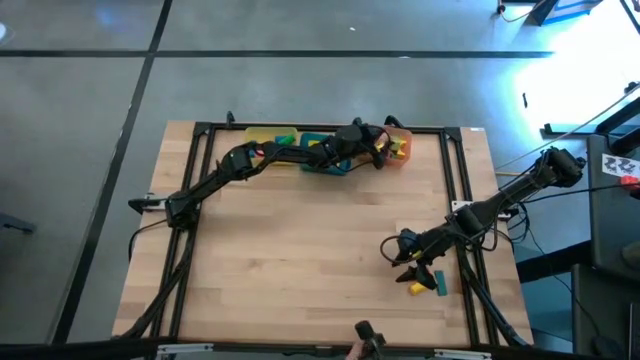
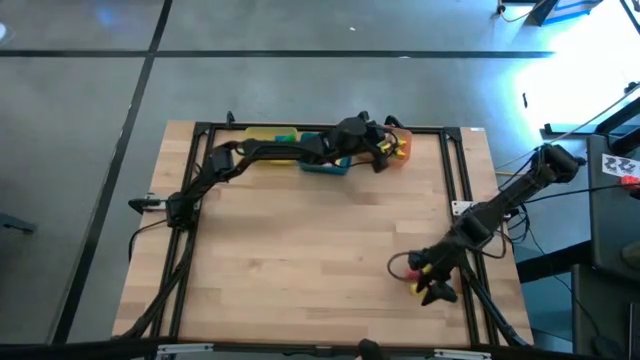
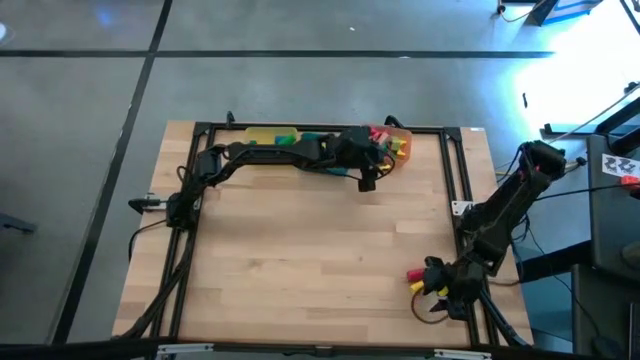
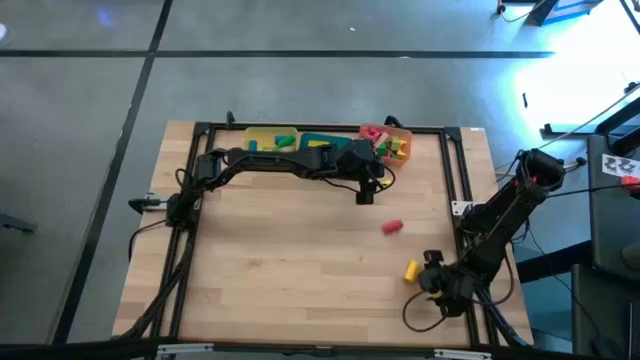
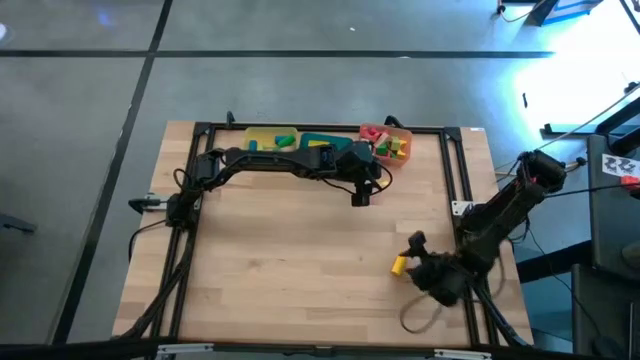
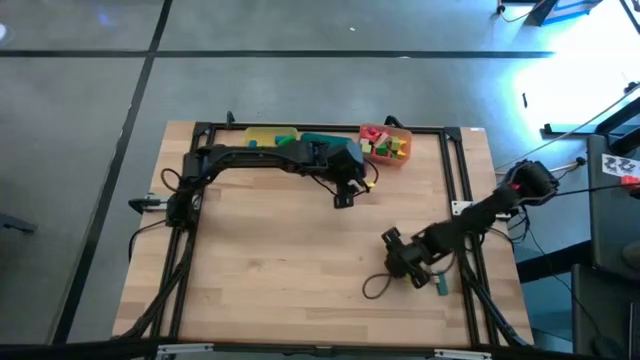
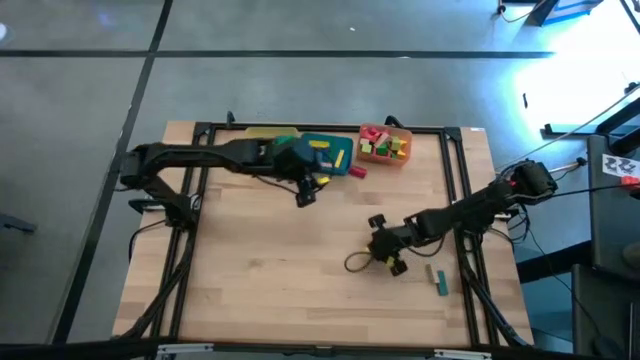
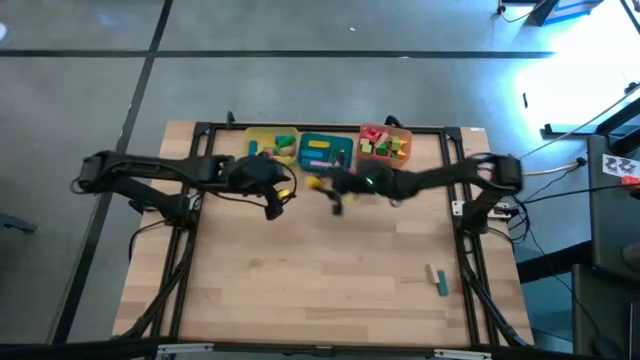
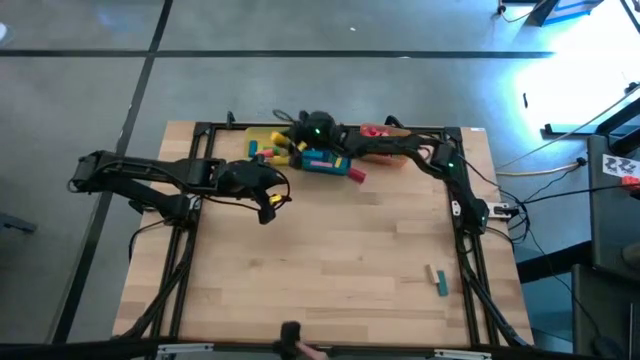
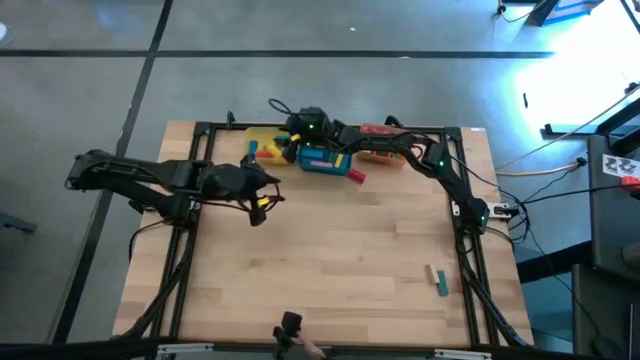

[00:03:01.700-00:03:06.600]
Task: Sort blocks by size
Put the yellow cylindrical block into the yellow bin

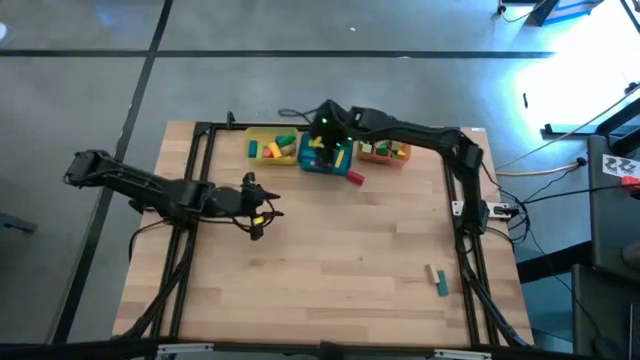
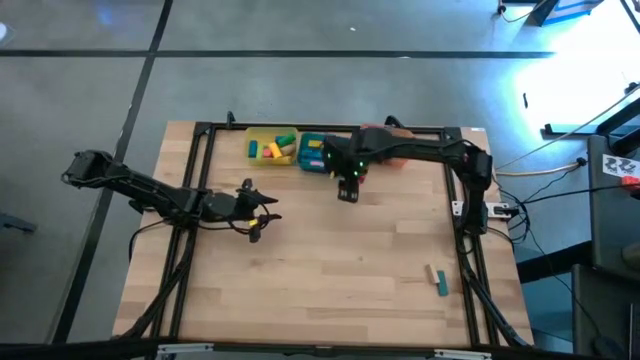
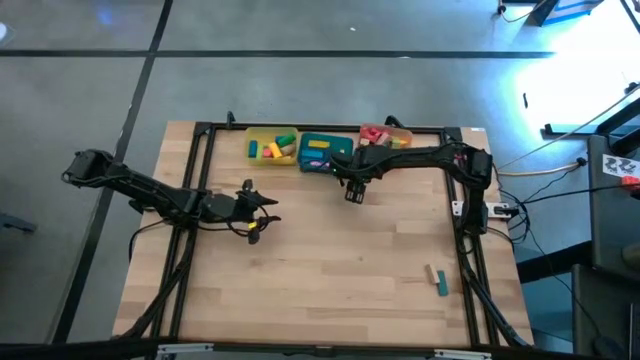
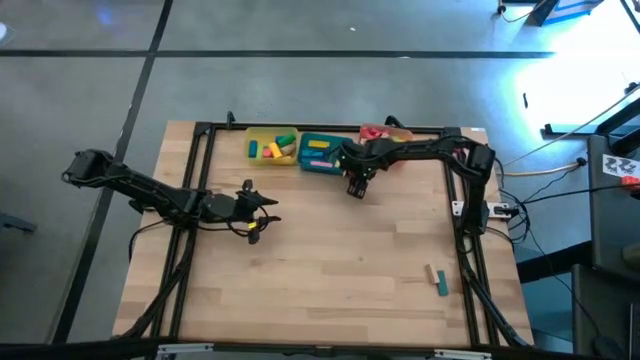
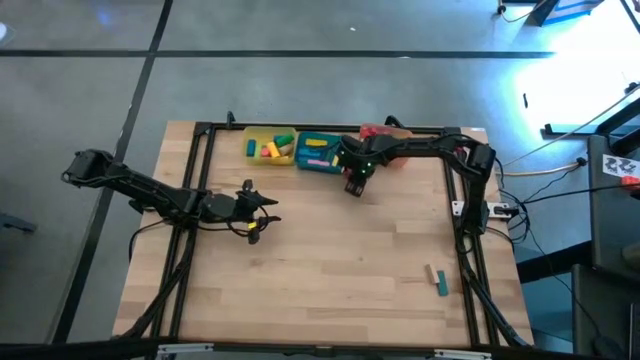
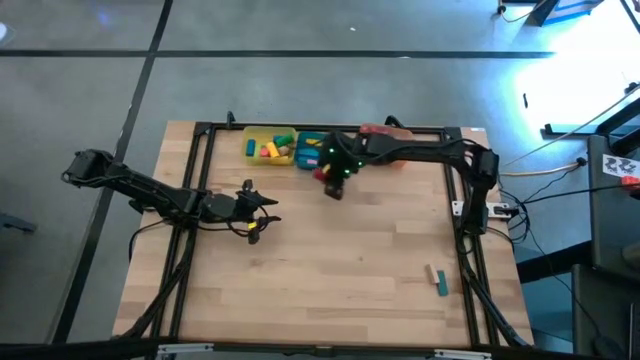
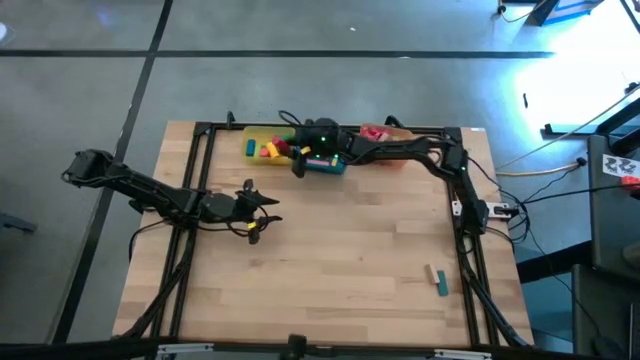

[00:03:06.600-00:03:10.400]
Put the red cylindrical block into the yellow bin

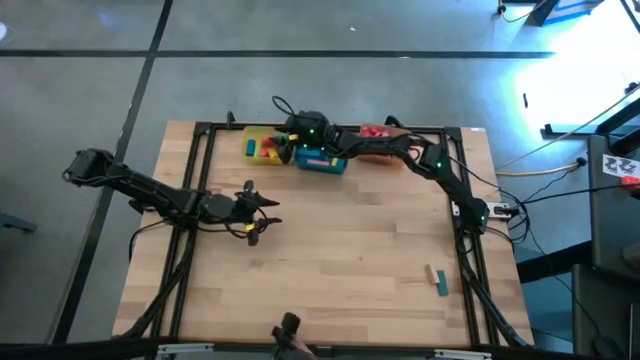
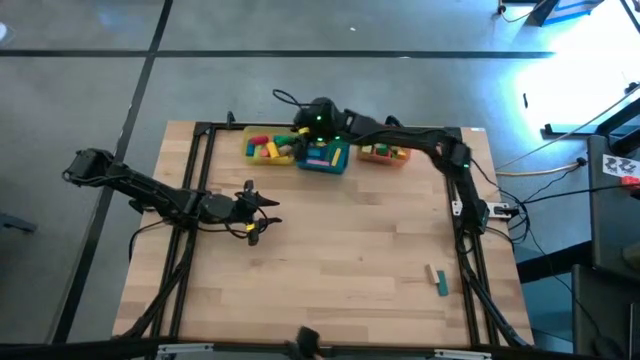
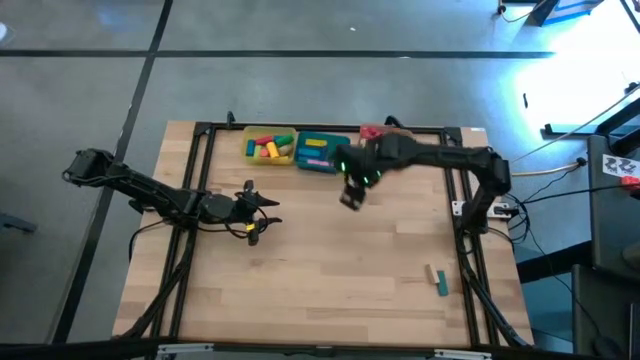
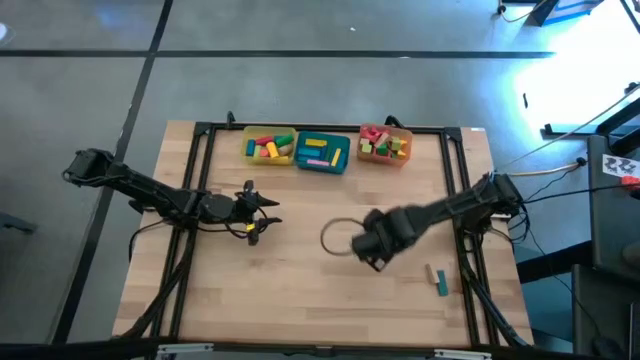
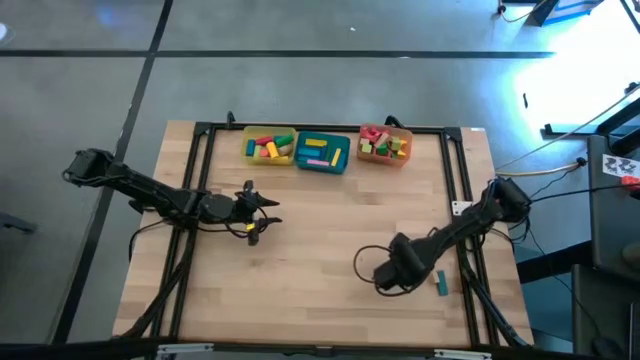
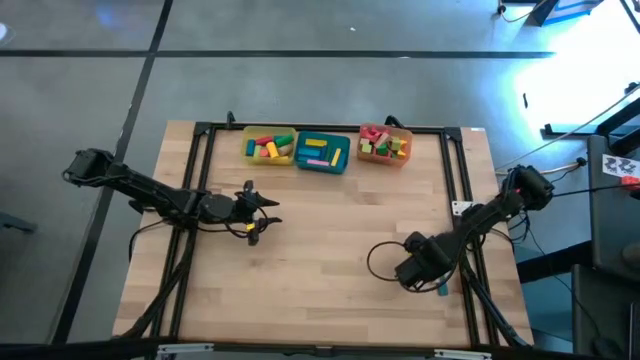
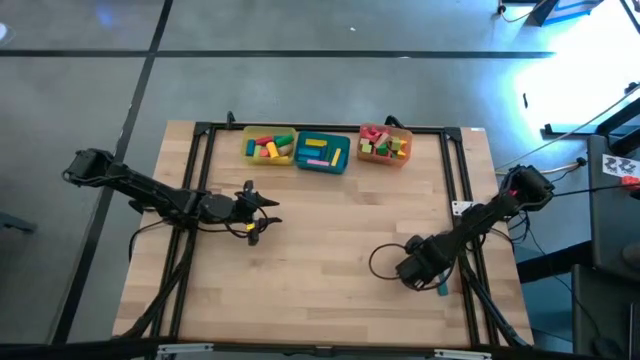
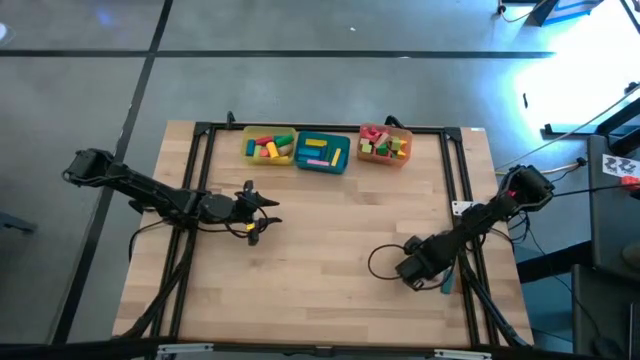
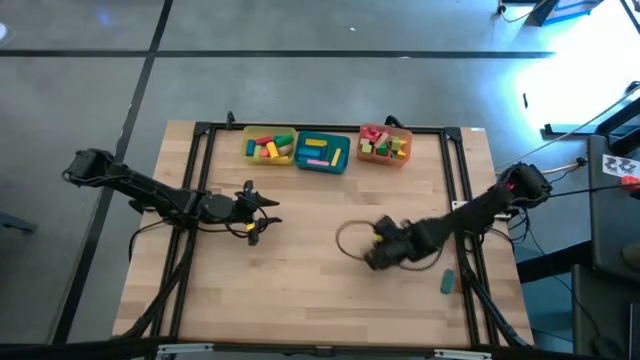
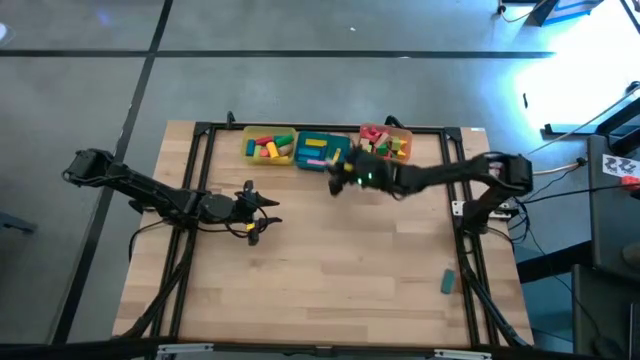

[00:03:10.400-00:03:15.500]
Put the brown rectangle block into the blue bin

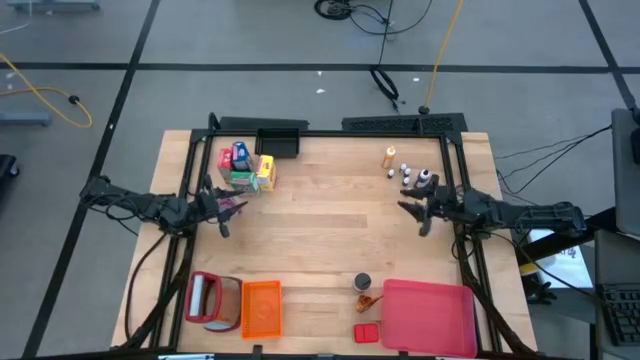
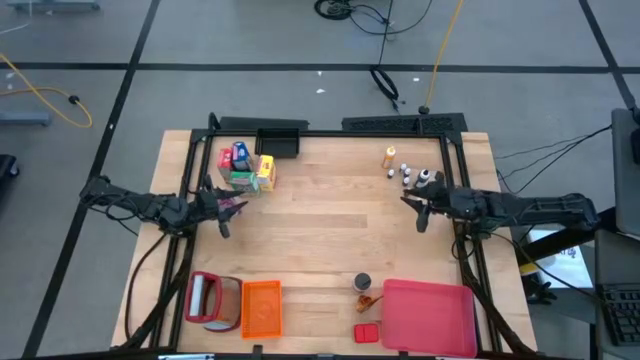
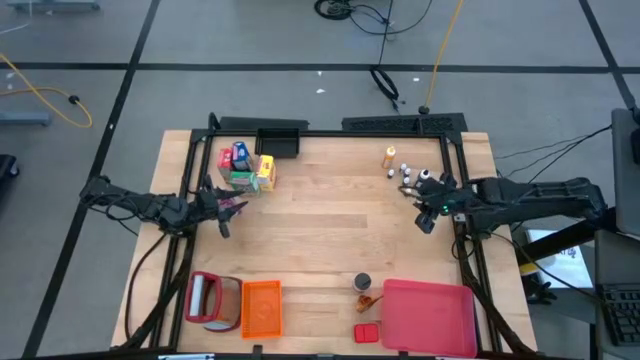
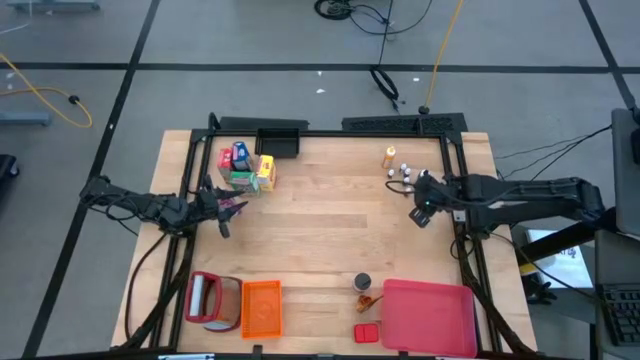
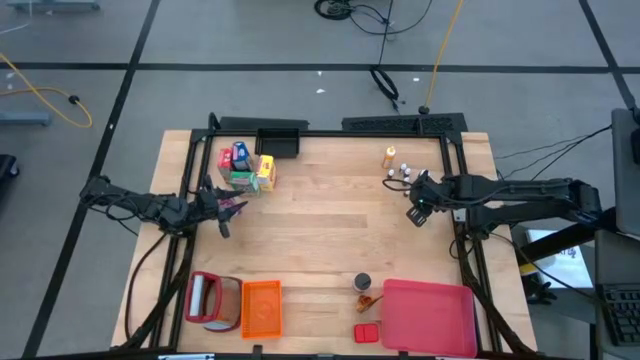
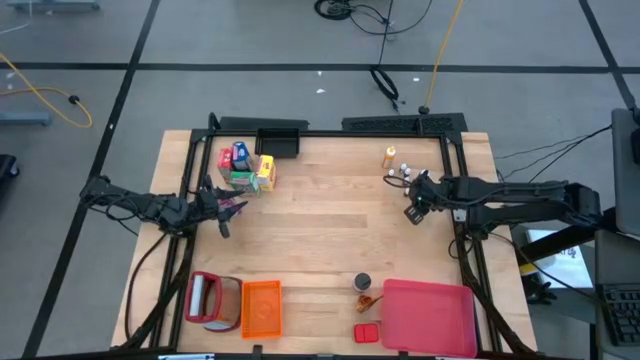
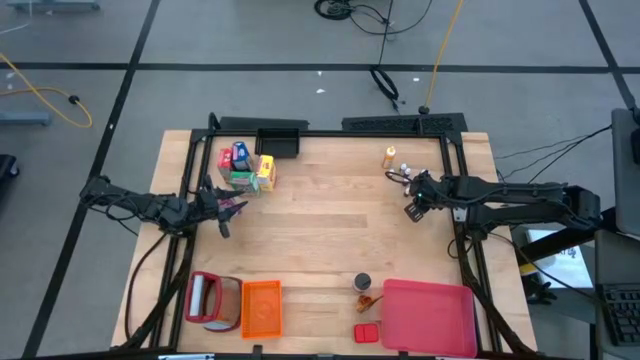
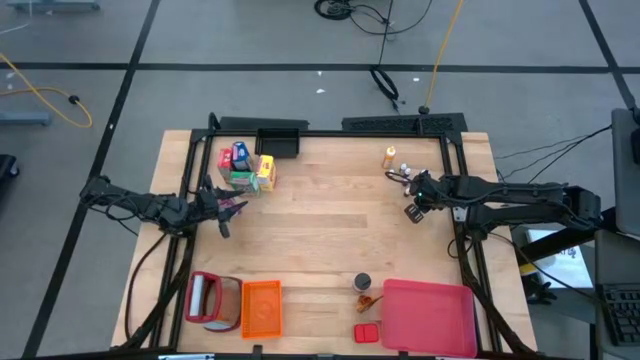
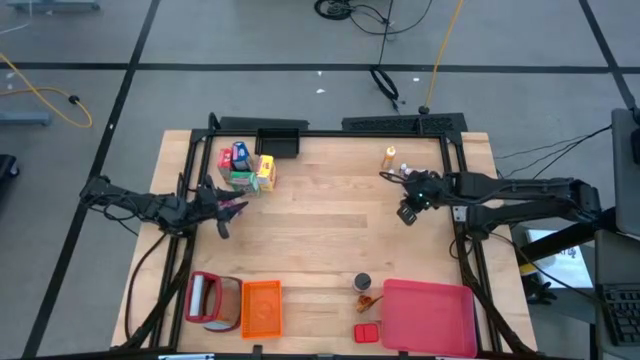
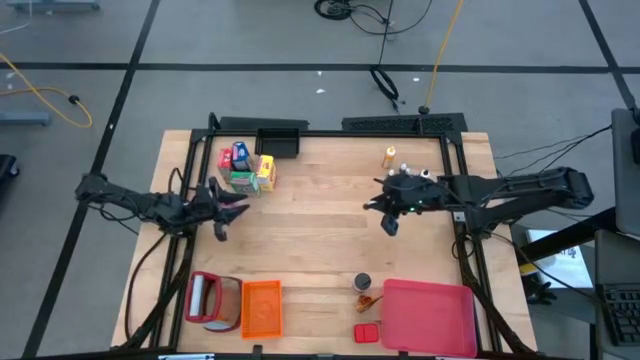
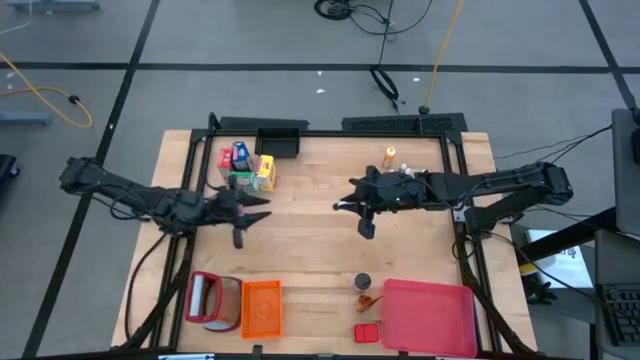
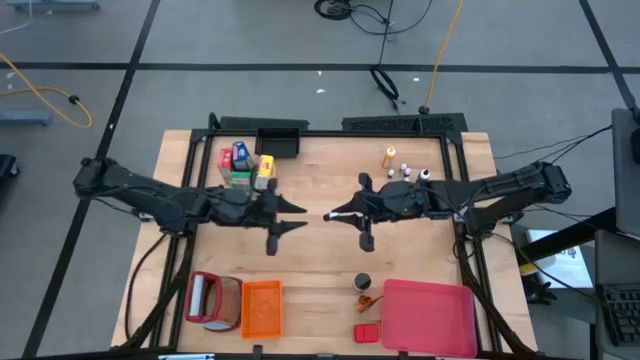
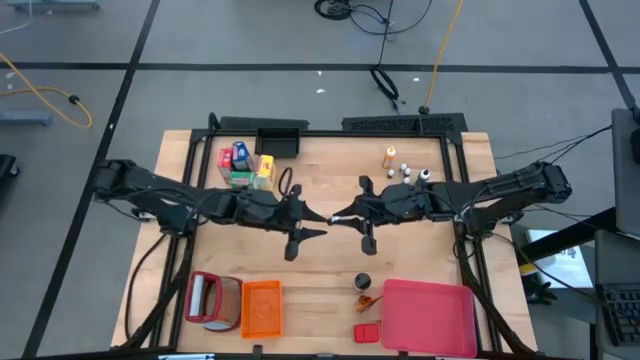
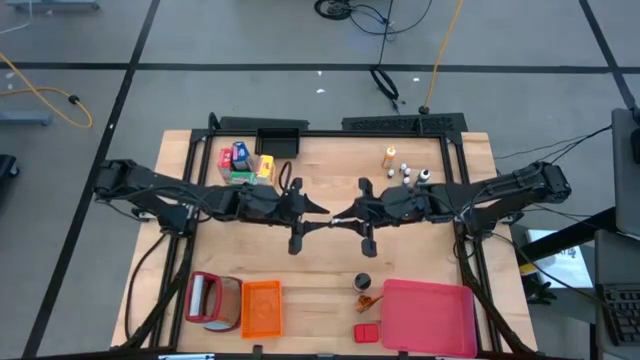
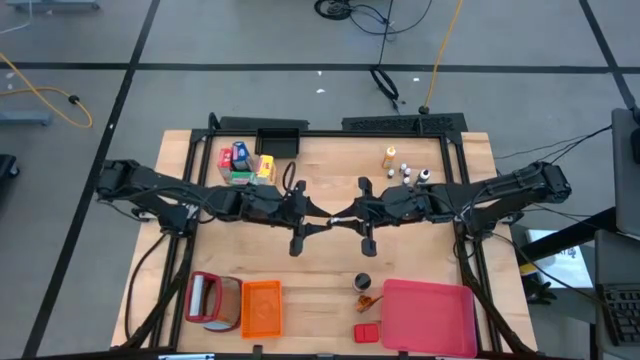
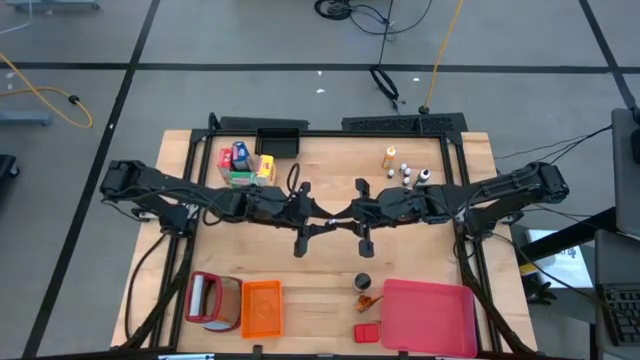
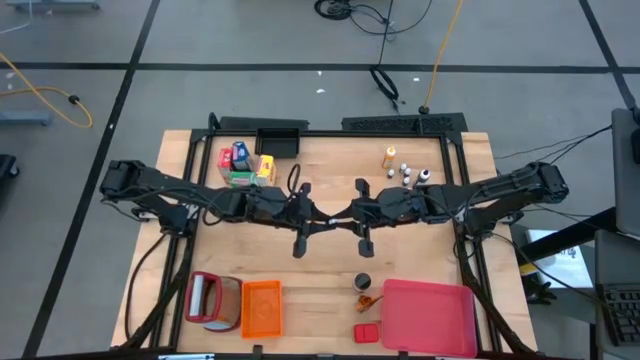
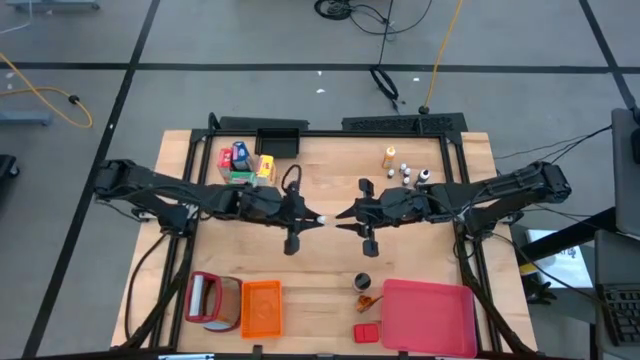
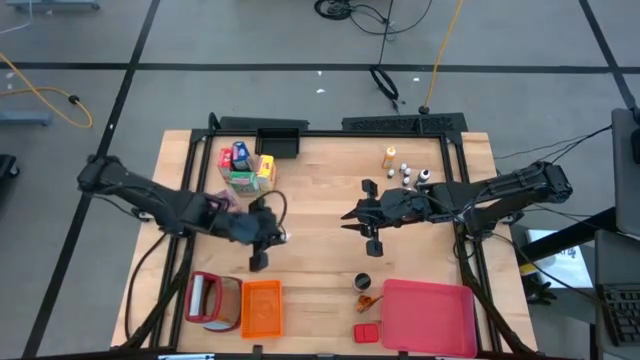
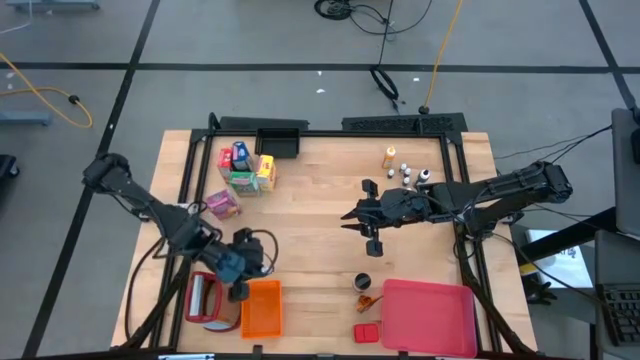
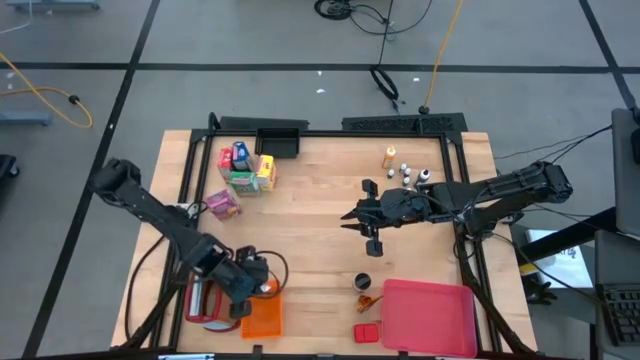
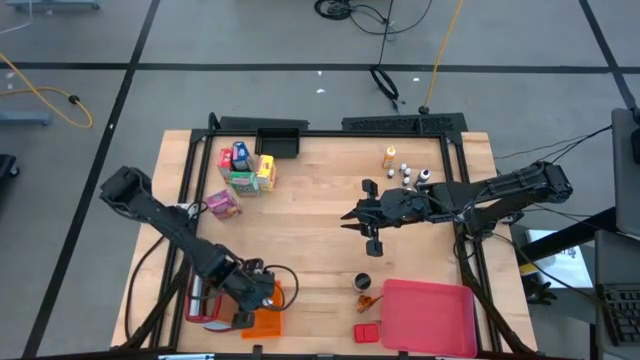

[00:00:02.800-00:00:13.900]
Task: Pick & Place Kitchen Items
Put the small yellow coloring bottle into the orange bin
